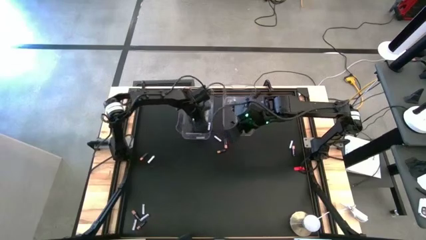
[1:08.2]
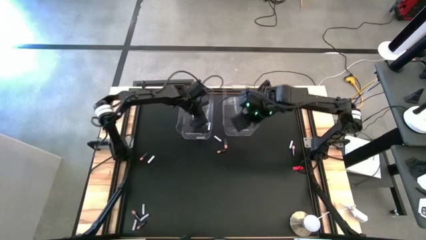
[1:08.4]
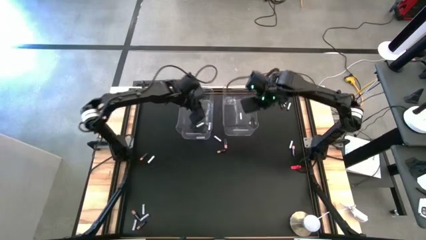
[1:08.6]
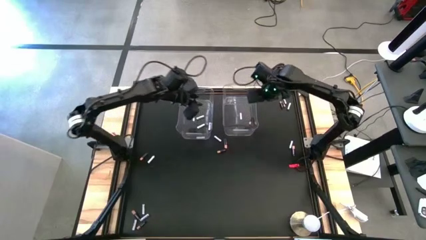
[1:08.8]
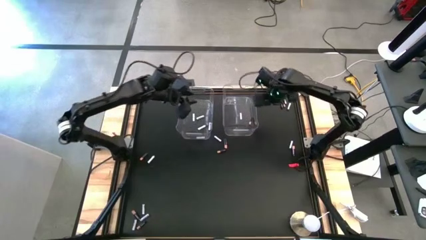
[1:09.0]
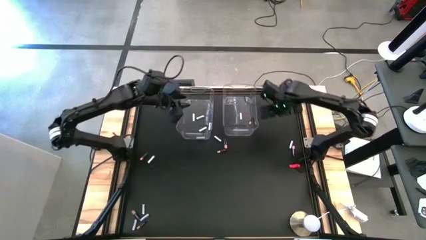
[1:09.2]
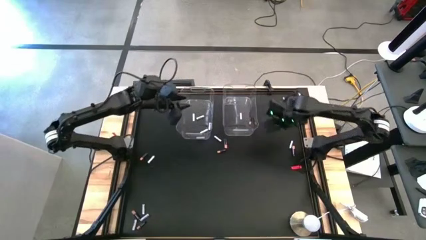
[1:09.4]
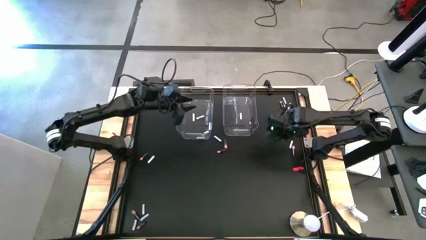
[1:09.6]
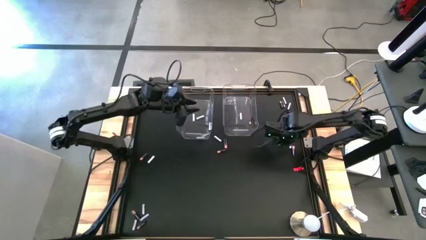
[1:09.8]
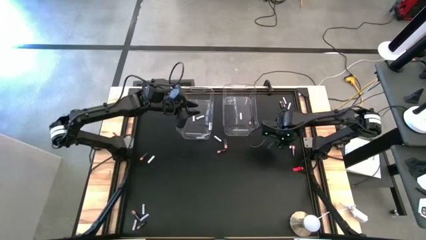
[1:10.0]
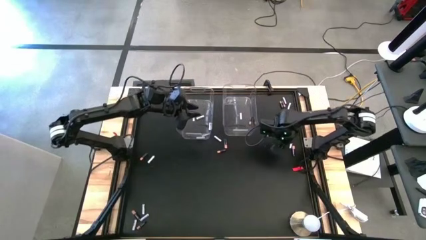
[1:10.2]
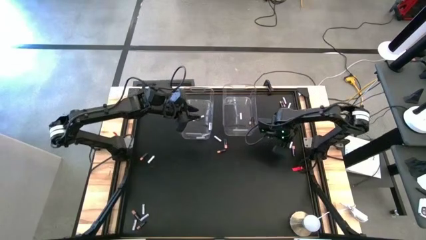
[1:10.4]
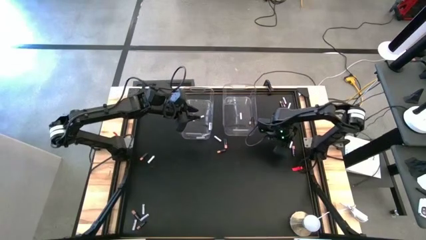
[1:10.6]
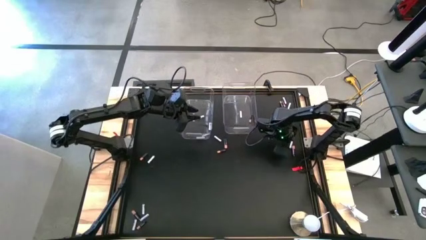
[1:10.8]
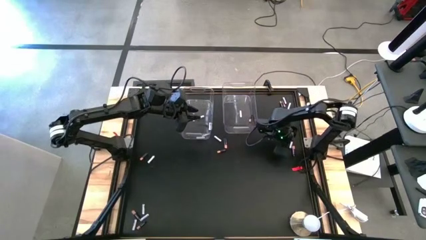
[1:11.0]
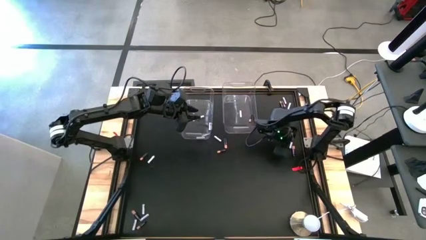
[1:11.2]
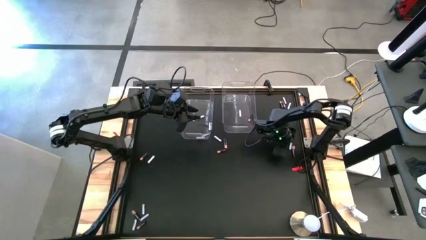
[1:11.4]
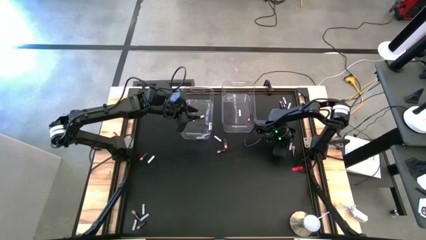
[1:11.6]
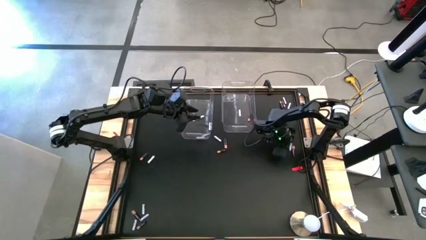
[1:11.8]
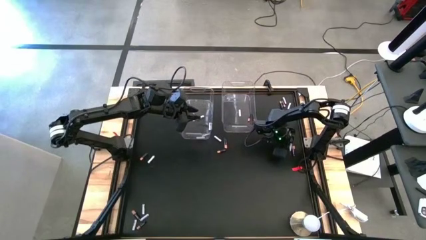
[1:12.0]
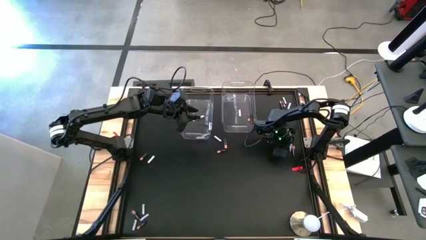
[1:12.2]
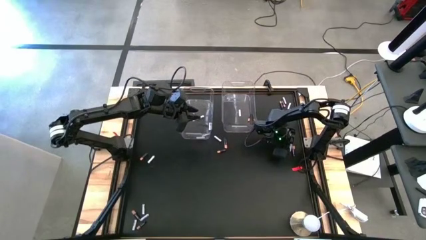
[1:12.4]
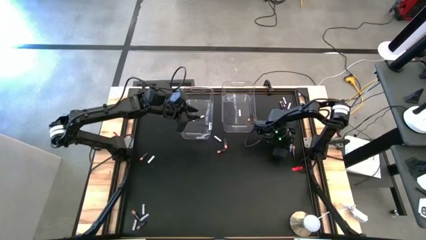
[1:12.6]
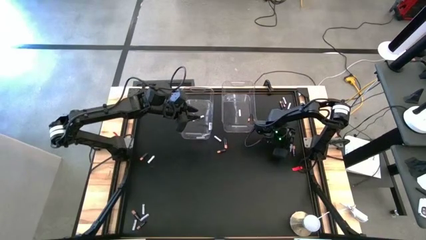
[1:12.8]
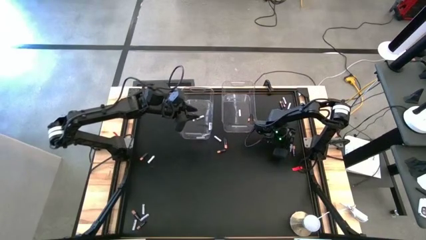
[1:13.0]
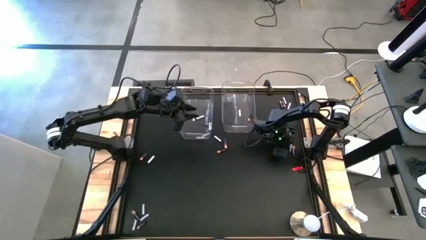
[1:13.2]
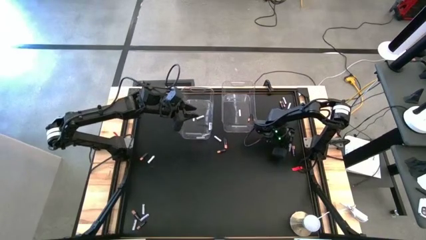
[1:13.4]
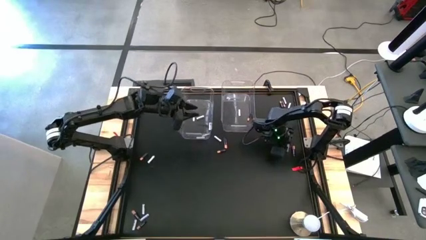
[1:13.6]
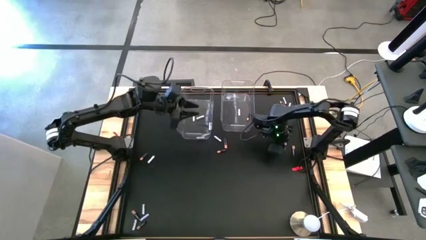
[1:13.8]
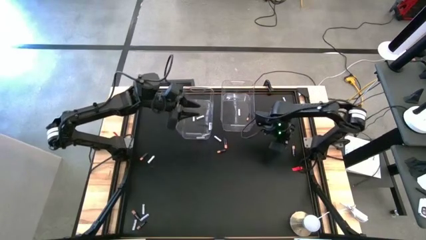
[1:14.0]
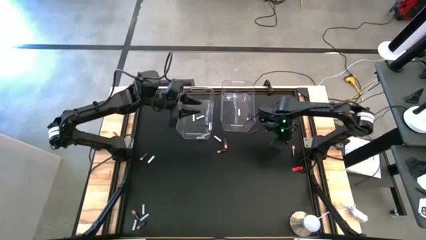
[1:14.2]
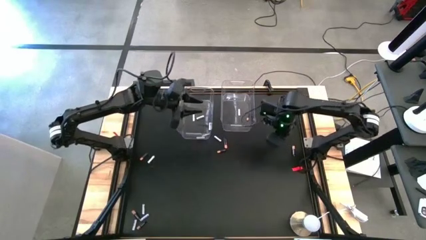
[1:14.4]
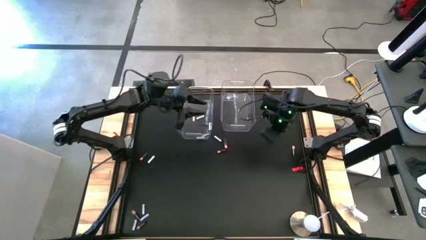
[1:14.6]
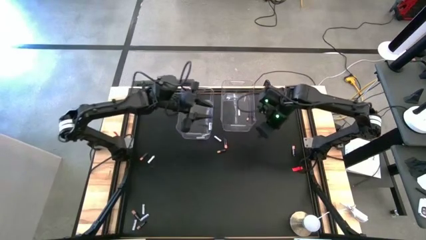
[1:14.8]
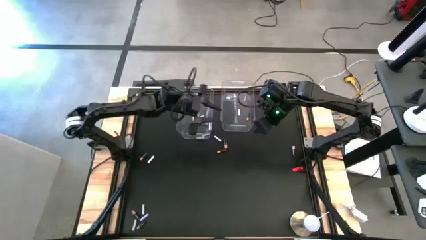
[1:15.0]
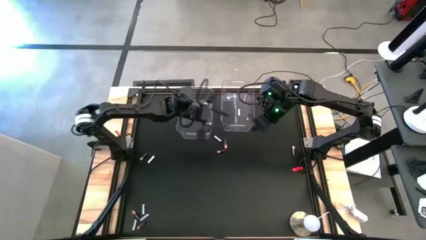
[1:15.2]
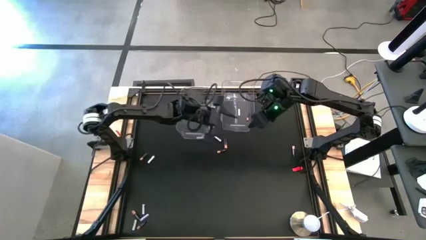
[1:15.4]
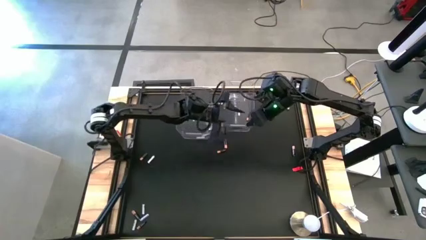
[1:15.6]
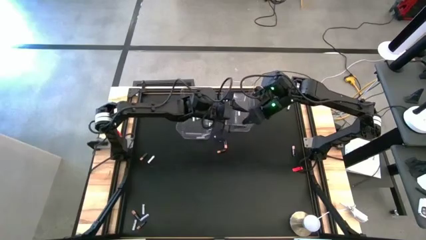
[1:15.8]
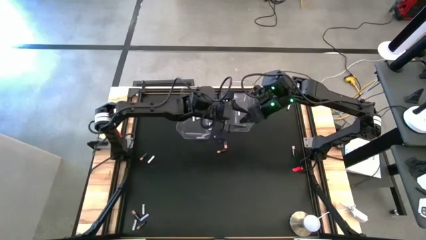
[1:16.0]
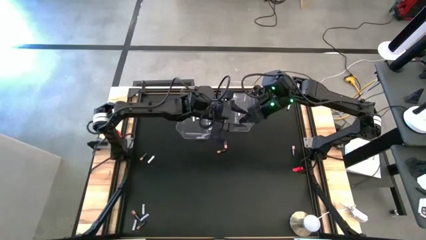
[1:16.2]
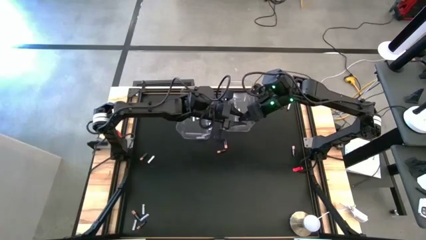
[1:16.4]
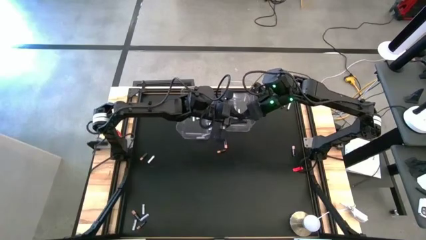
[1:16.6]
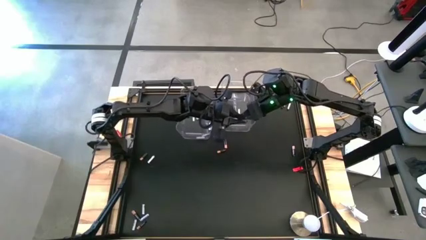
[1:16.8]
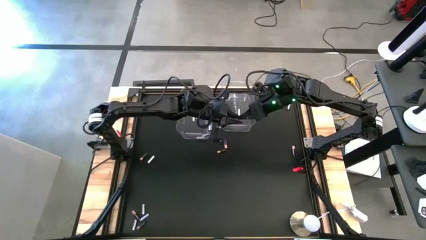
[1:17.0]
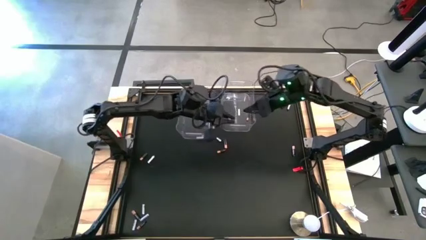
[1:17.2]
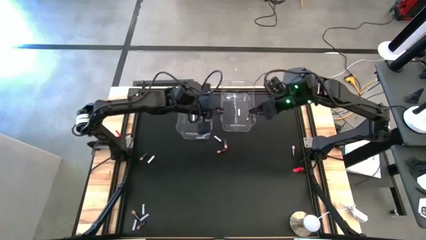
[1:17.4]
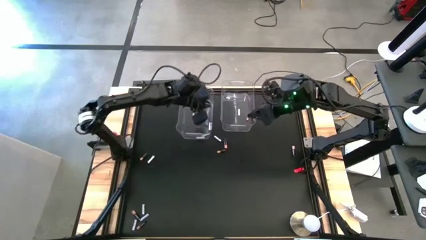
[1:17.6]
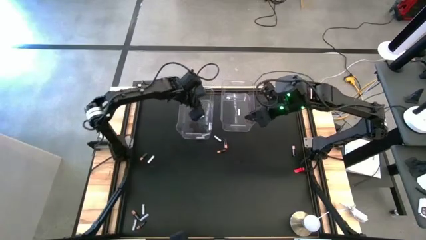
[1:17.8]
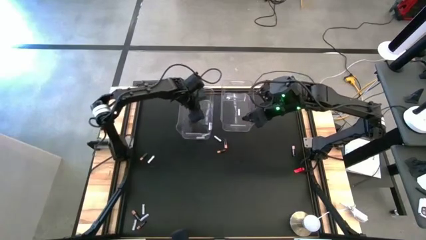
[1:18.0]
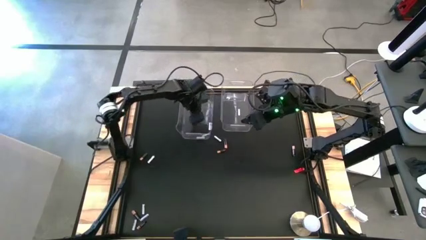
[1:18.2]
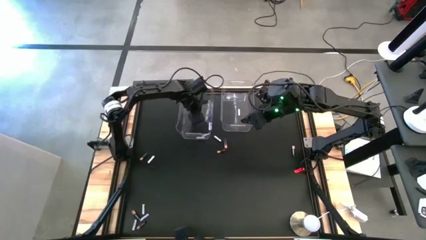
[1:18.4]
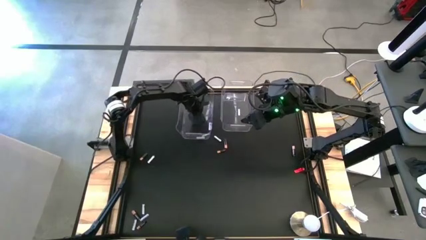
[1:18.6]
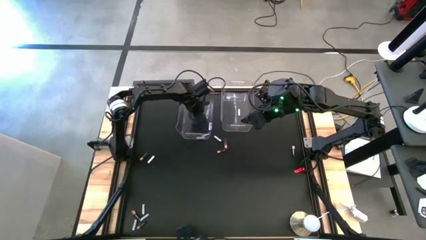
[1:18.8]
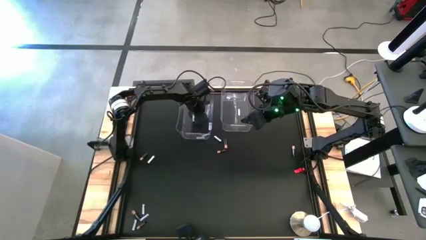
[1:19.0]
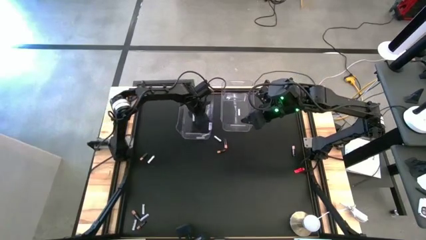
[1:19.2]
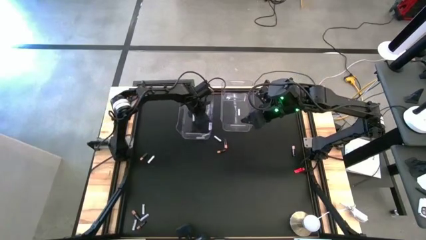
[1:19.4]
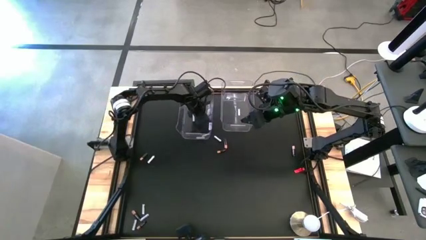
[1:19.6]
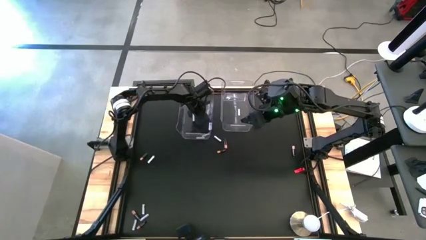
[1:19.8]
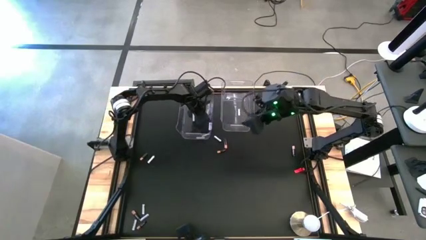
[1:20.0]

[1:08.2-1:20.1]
Task: Sort batteries
Put the white battery into the left transparent bin

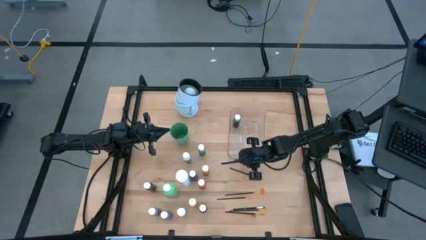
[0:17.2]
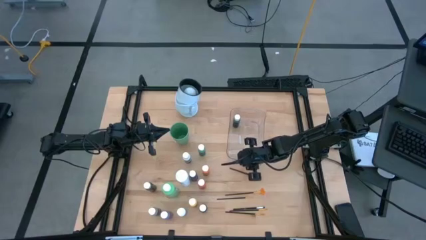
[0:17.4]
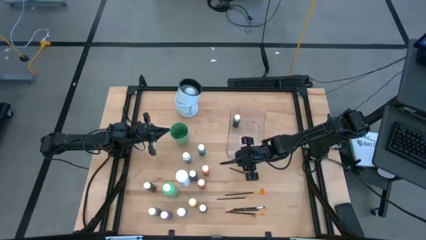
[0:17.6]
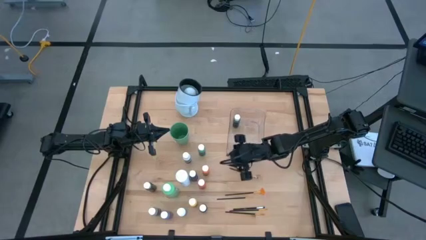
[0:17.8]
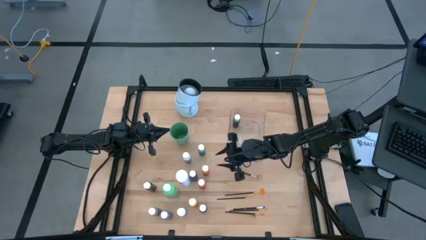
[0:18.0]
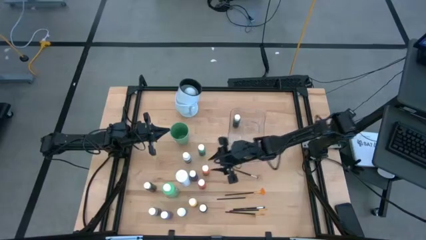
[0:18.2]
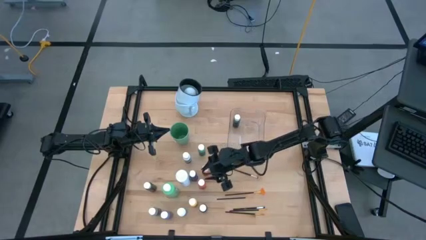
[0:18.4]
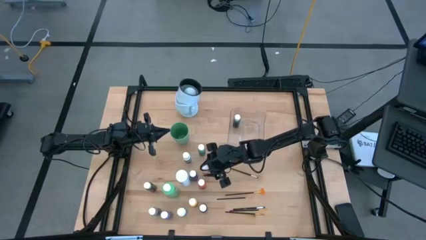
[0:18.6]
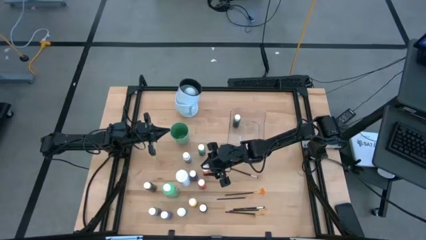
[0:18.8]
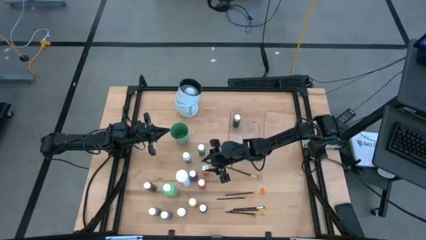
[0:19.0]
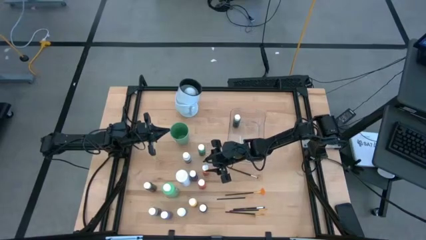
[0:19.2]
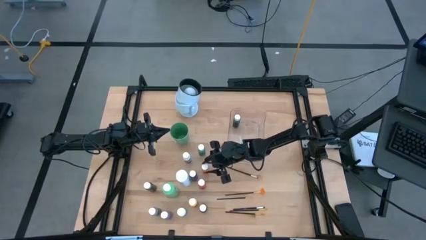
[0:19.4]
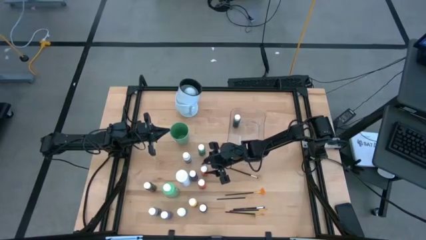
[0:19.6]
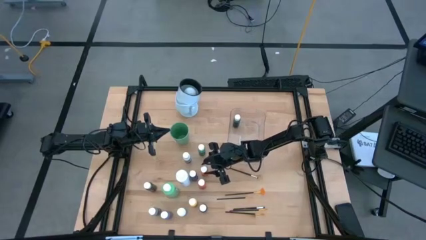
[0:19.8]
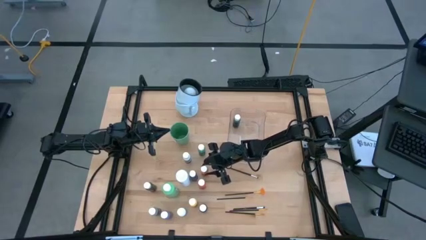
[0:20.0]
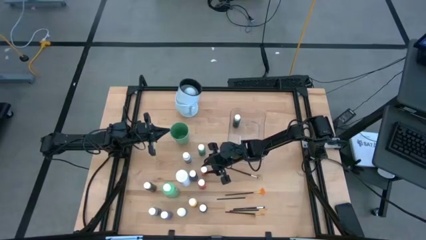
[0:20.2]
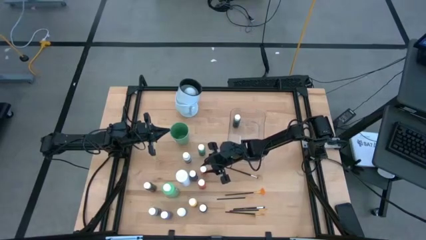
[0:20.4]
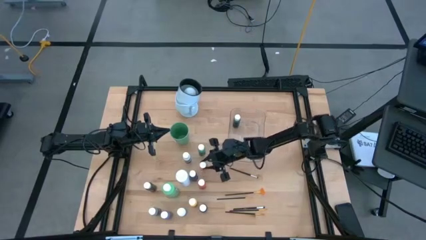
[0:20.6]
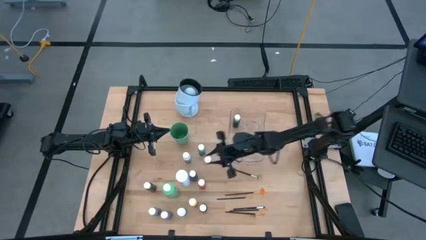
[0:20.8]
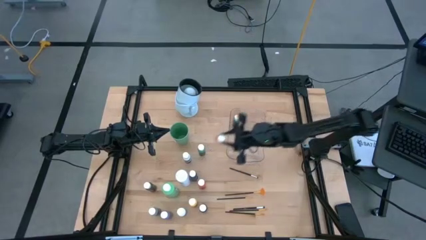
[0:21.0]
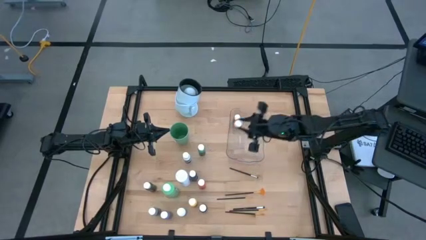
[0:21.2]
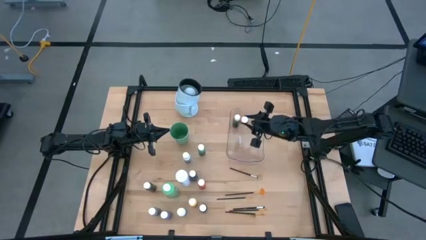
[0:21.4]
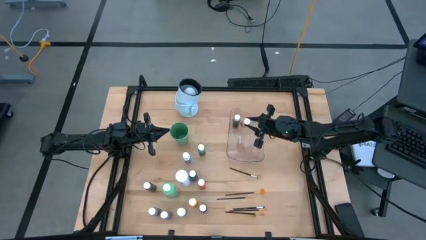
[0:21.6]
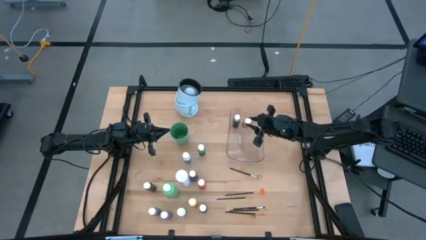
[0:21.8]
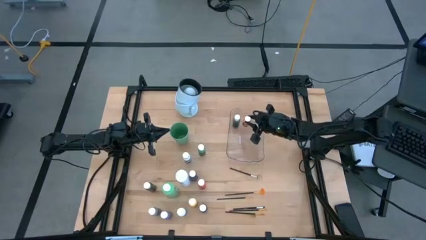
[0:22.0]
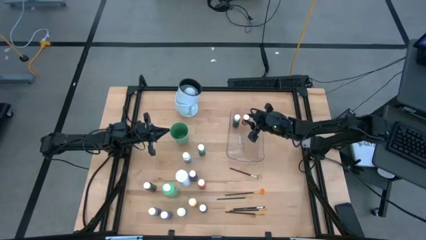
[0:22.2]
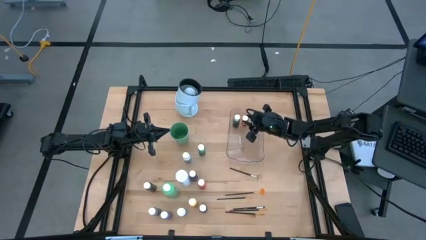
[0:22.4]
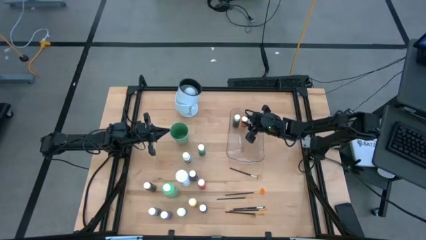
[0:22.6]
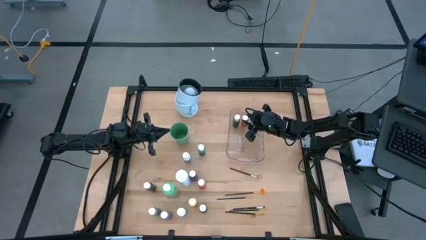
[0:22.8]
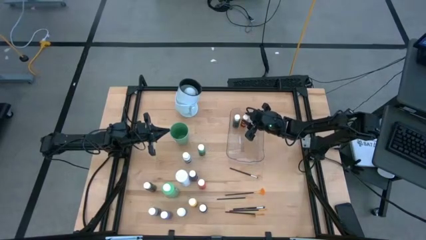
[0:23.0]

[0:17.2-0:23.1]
Task: Pick & Place Paint Supplies
Put the orange paint bottle into the transparent bin
